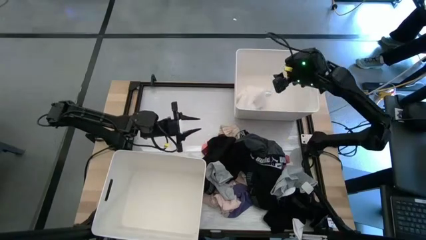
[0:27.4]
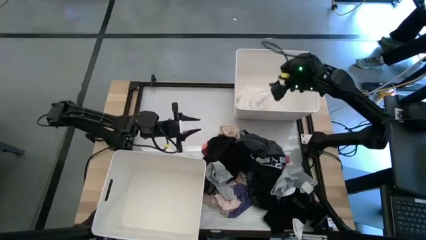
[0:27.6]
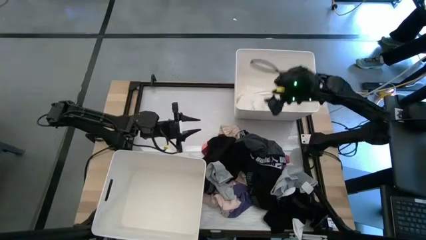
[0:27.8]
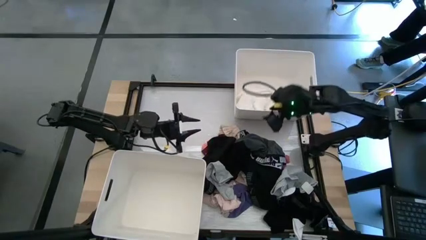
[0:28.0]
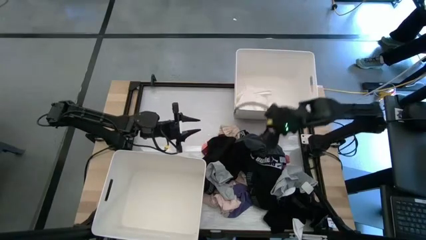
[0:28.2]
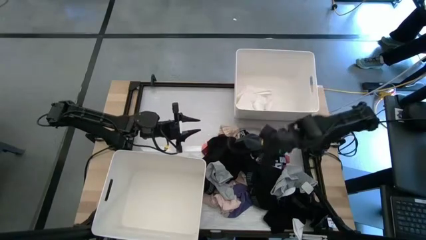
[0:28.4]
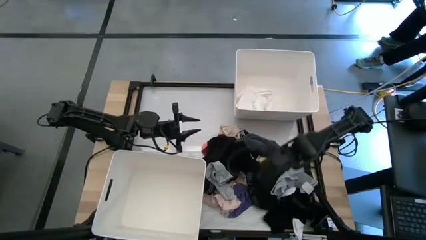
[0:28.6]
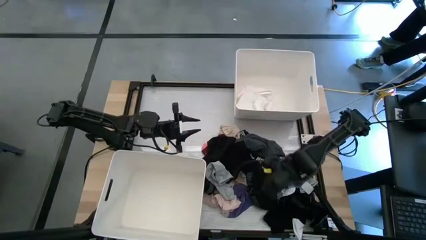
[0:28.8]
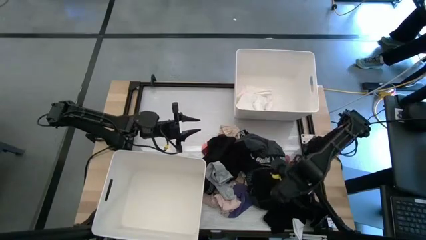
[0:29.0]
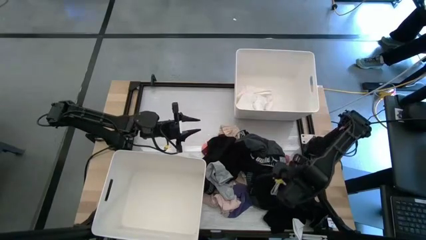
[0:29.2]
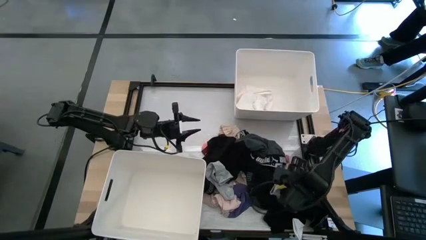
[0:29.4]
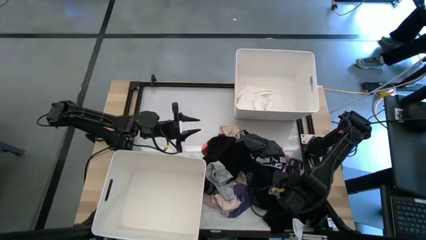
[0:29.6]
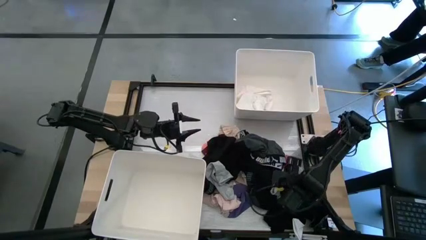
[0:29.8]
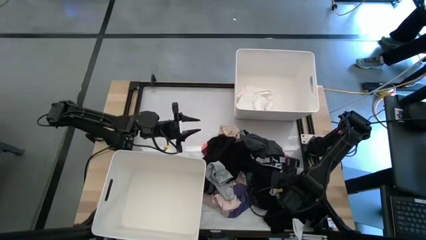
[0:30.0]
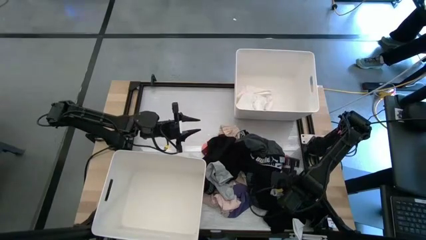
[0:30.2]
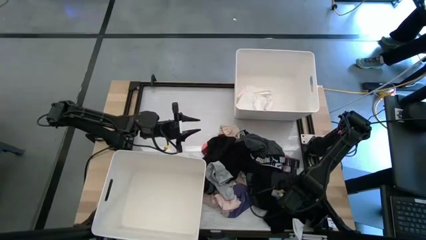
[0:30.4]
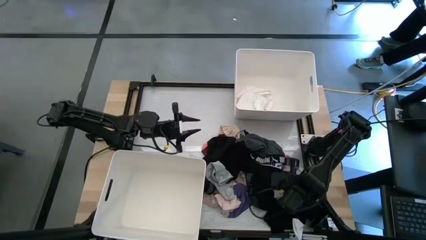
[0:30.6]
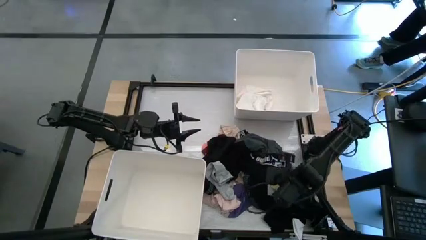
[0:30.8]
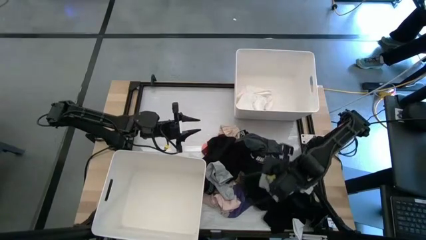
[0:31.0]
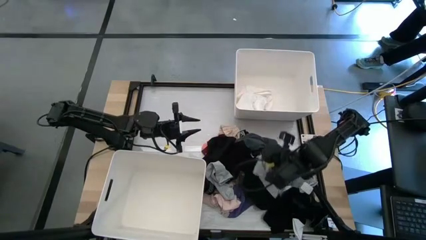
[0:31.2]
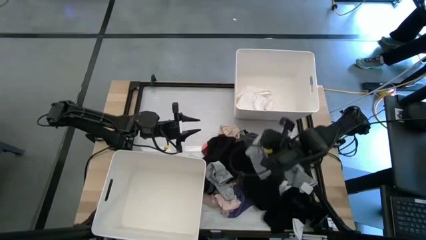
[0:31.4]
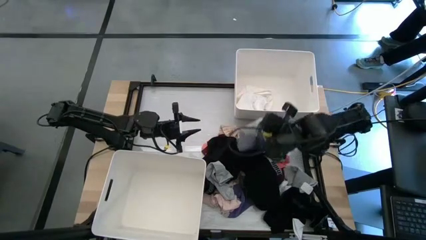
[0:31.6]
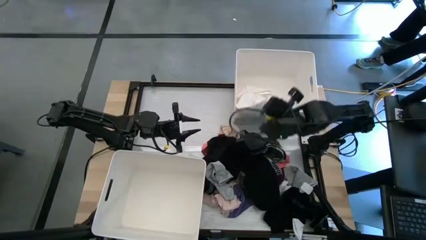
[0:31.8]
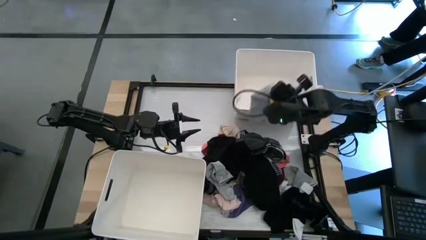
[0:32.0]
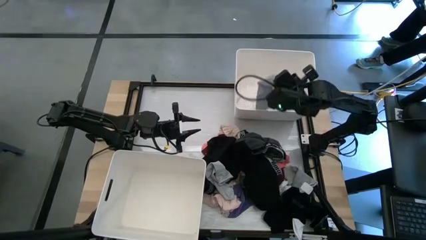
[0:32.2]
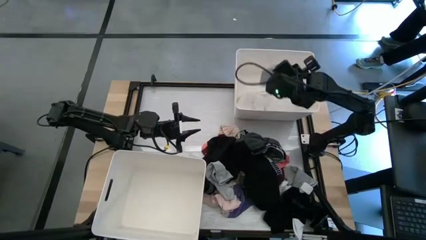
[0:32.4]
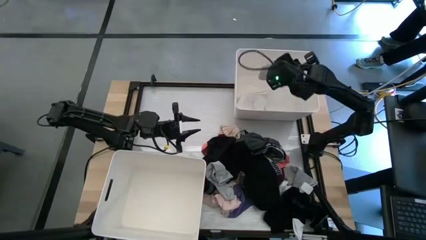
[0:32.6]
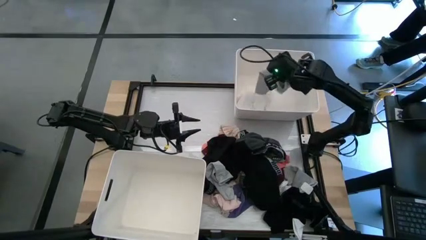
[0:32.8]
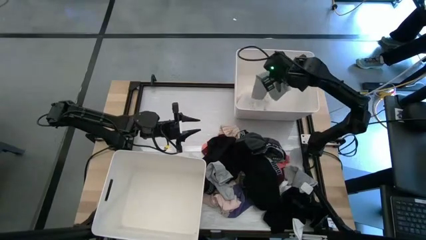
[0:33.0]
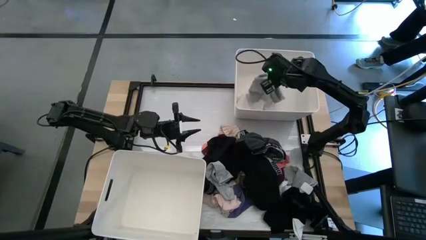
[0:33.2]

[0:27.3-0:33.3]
Task: Sort clothes
Put the gray underwear into the top white laundry bin

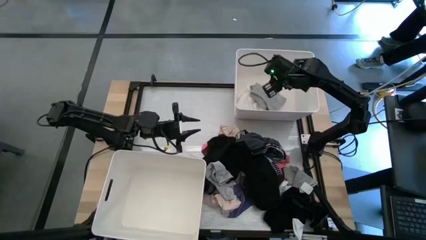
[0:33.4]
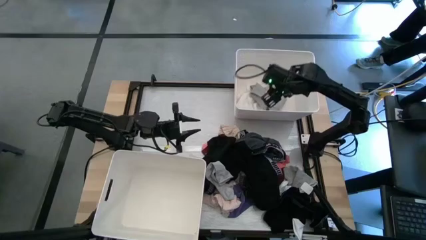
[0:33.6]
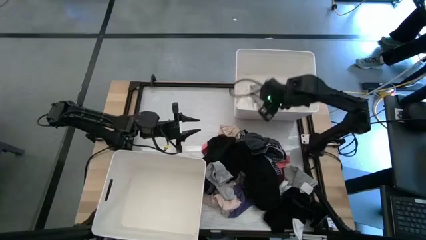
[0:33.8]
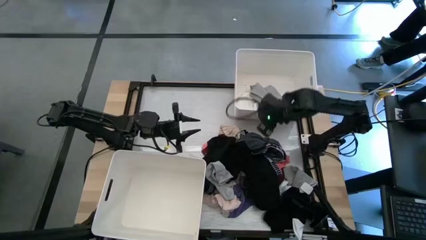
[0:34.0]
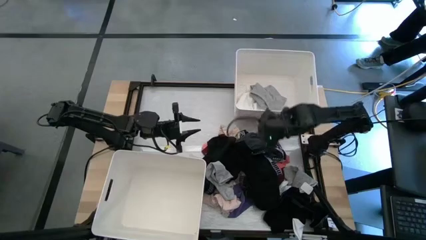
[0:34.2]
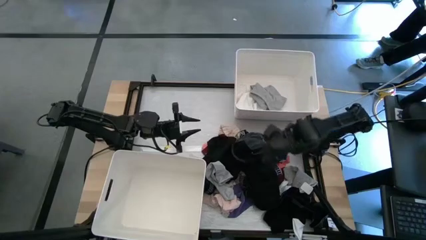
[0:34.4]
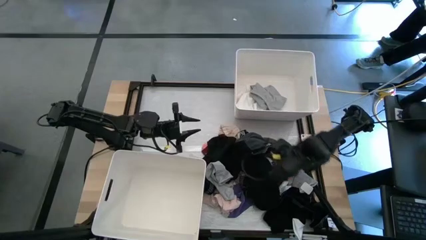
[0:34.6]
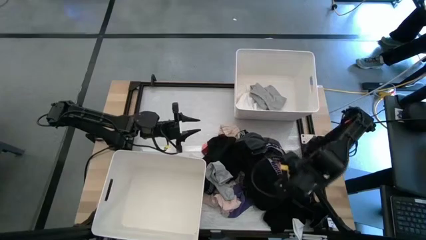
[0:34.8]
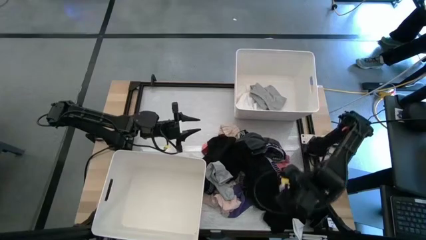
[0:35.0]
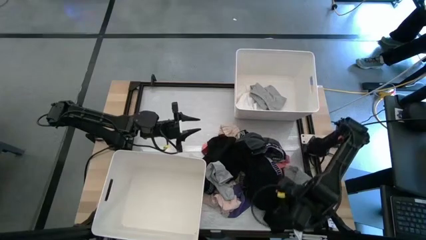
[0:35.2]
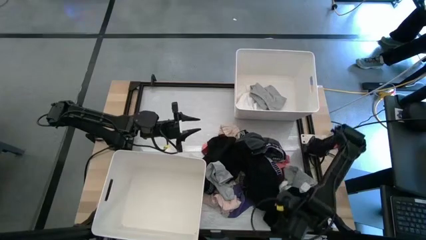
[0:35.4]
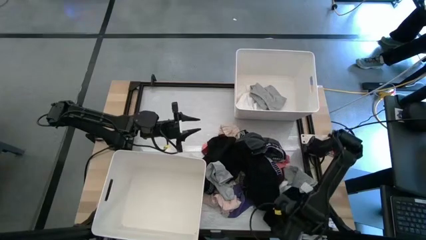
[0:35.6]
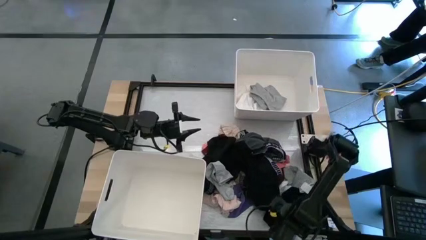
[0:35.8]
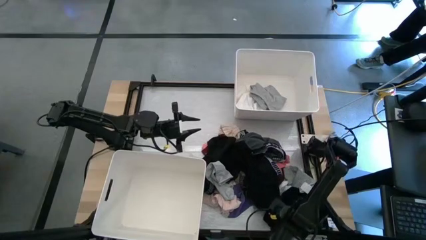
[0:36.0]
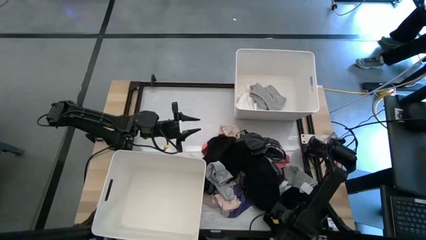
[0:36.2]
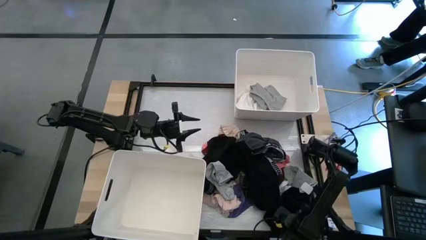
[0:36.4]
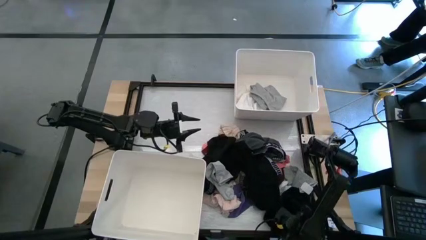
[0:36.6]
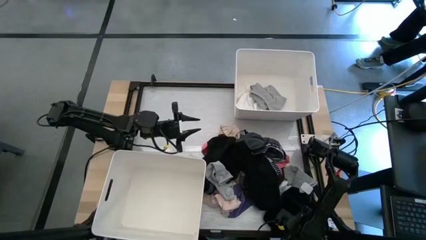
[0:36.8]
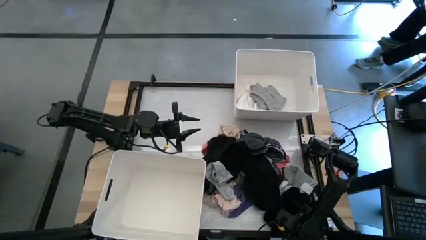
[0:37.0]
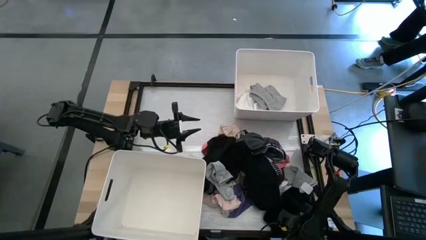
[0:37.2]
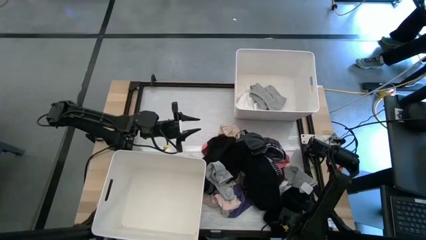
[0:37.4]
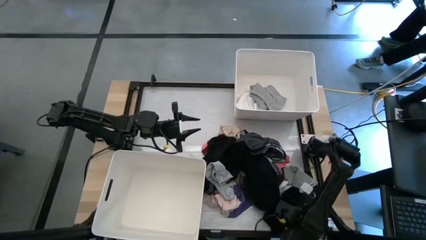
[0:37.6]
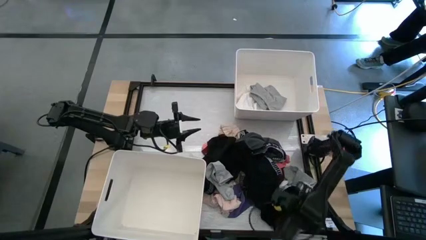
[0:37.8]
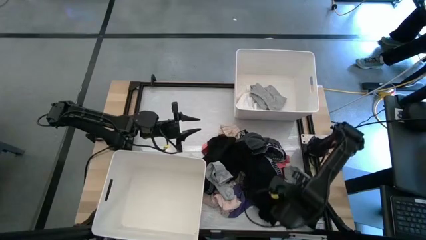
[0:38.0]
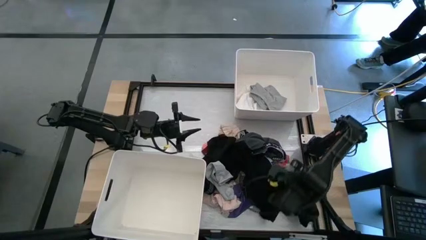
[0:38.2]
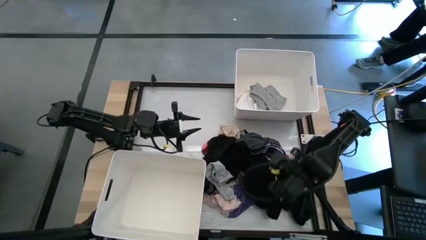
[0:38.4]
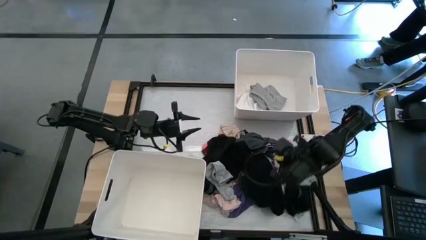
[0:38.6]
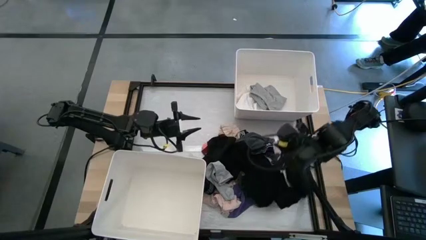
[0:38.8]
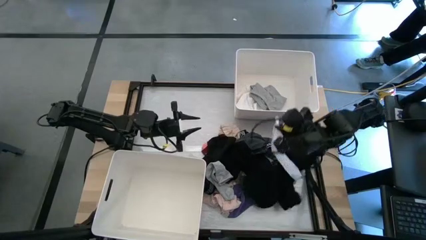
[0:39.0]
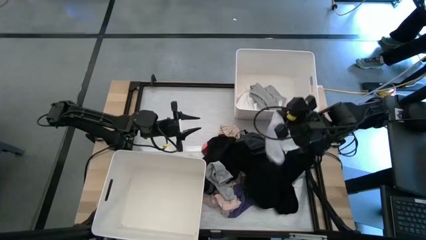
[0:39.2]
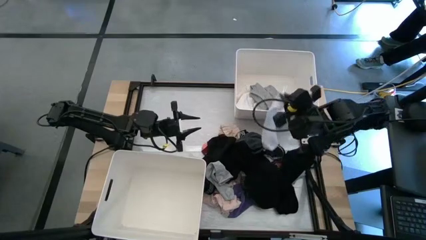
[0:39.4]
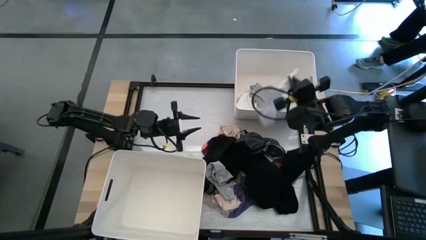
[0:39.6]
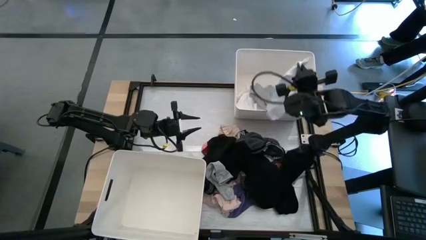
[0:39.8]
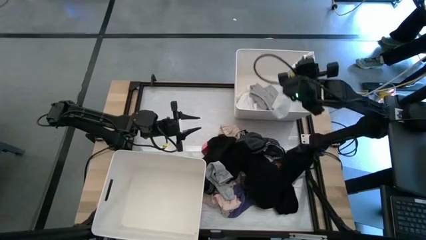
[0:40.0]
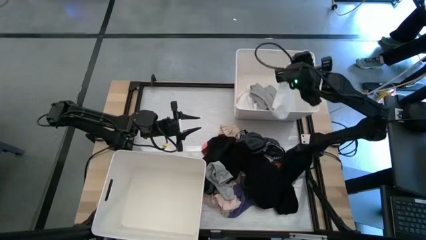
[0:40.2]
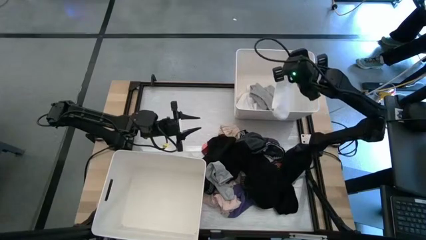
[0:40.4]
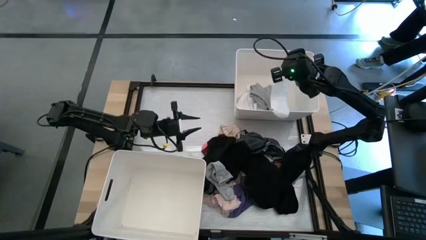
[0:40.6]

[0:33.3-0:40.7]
Put the white sock into the top white laundry bin

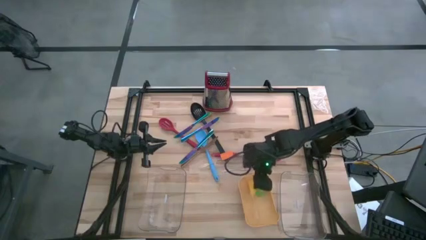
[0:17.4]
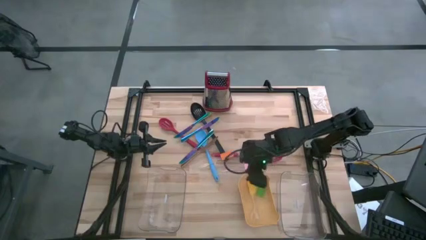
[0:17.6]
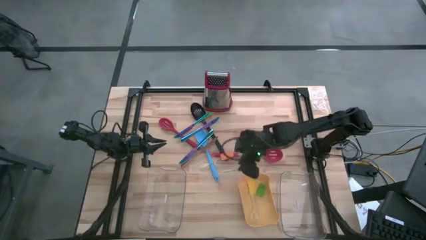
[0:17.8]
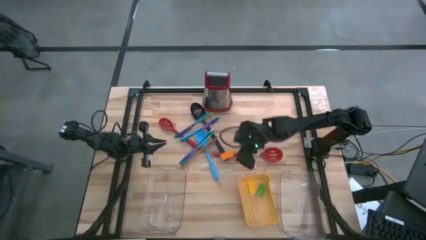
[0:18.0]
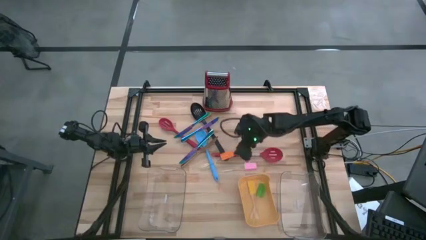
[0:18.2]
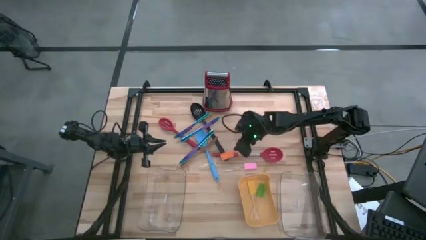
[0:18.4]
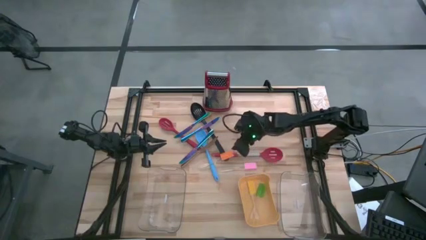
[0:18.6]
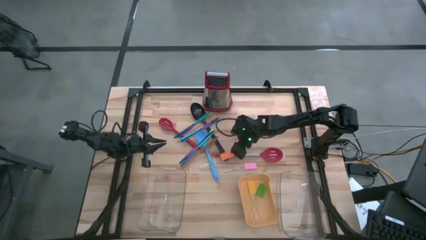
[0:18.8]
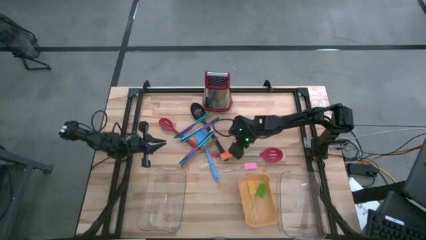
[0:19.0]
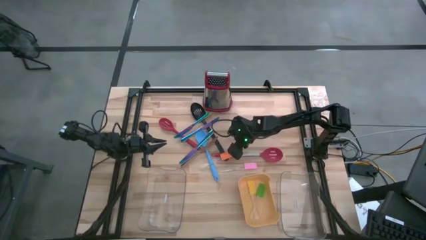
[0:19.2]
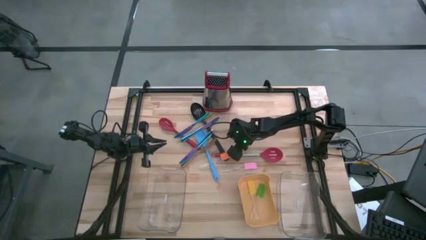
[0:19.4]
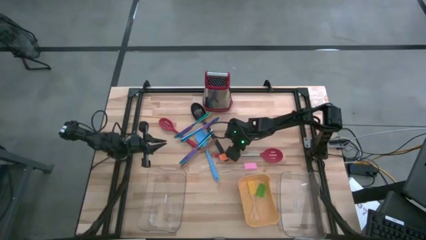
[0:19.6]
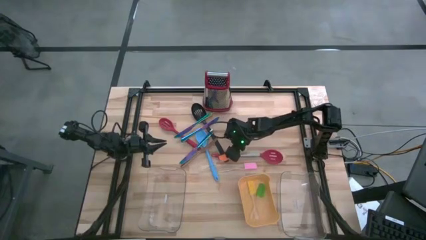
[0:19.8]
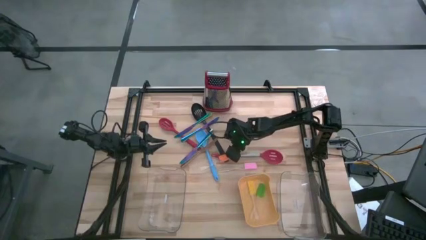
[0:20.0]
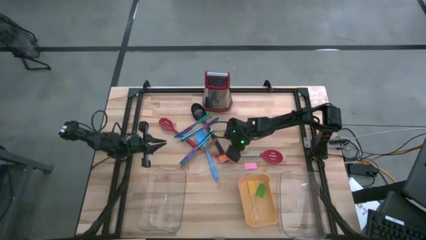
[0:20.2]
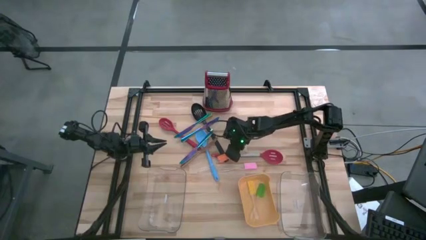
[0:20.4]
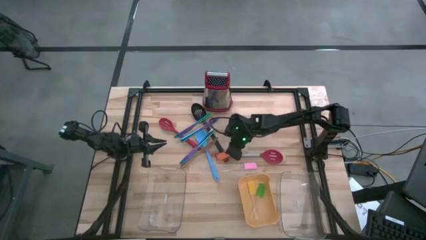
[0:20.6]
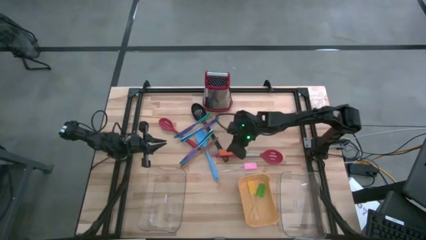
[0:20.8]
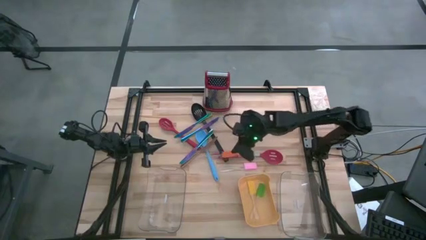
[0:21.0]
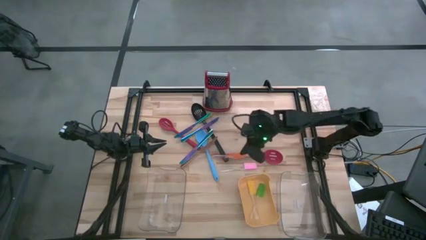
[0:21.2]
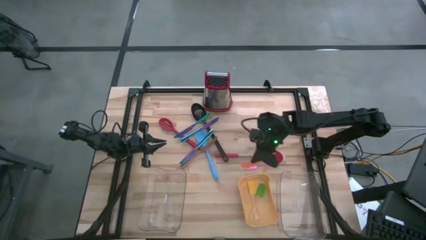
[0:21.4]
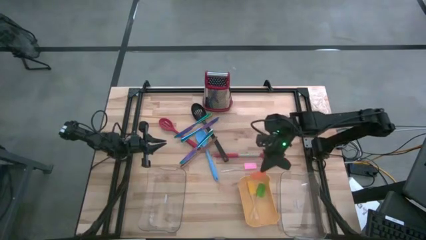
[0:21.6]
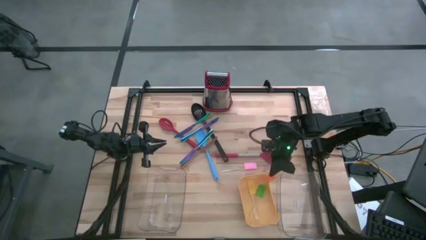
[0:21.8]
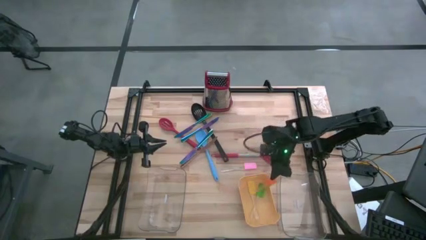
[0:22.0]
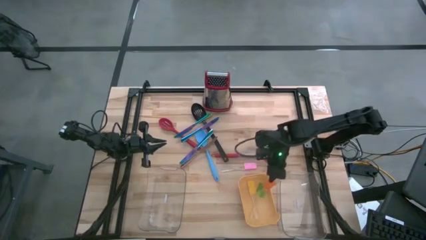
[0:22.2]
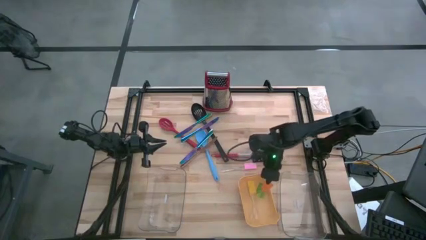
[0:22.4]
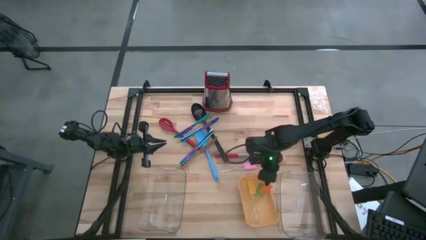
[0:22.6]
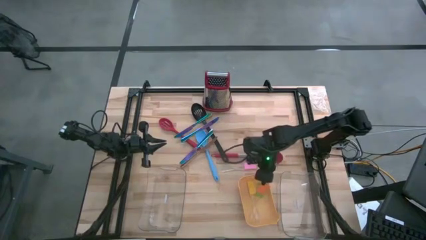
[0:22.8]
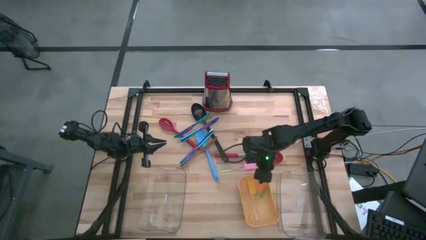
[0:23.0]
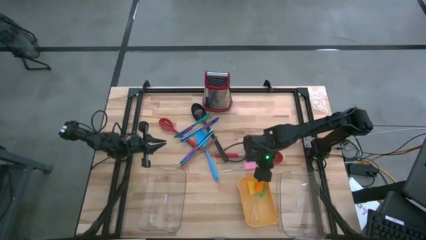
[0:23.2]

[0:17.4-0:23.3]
Task: Pick & Place Kitchen Items
Put the orange spatula into the yellow bin
